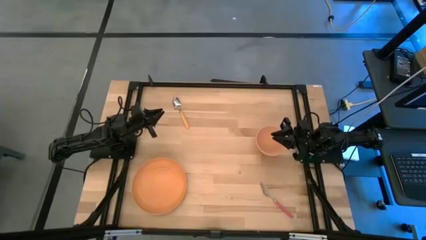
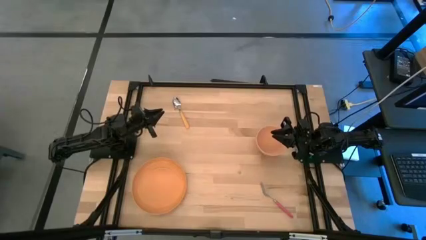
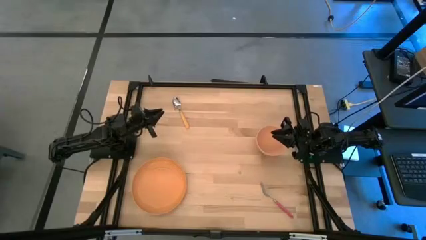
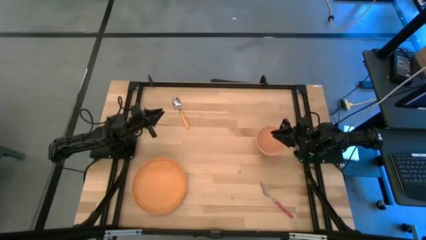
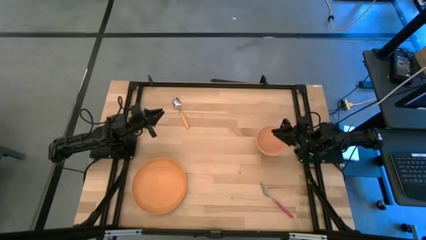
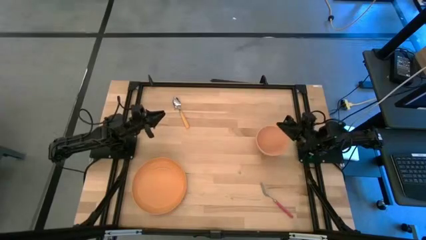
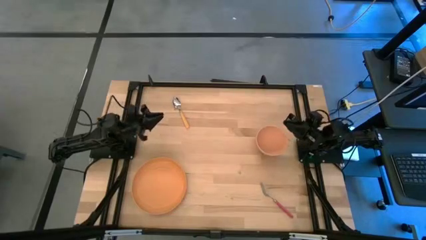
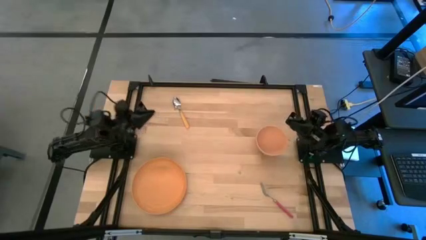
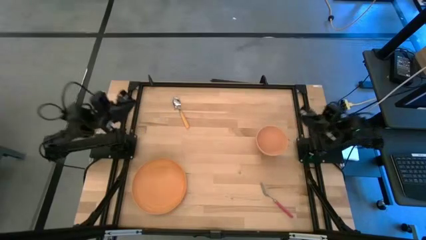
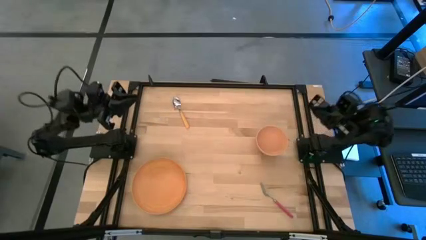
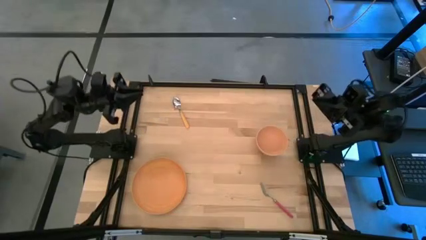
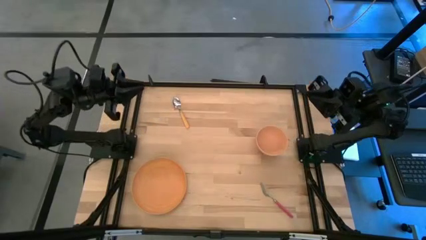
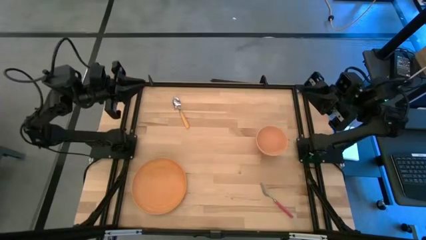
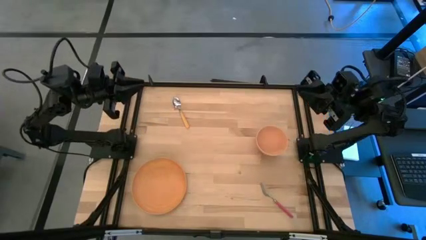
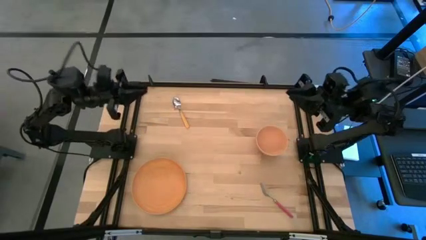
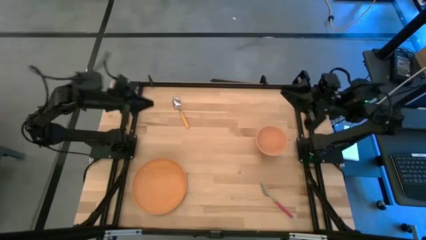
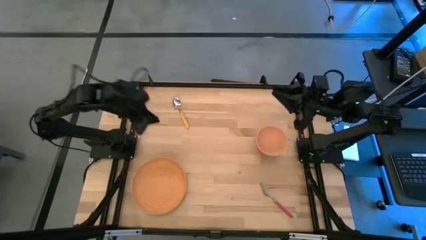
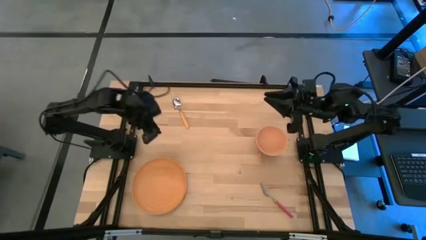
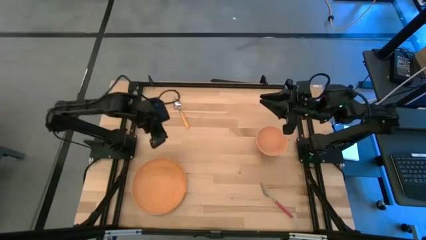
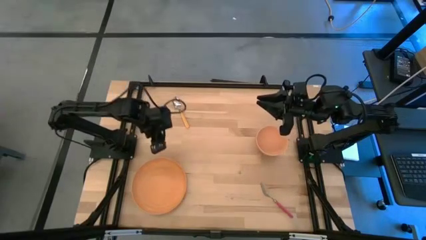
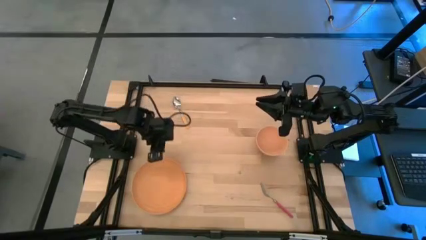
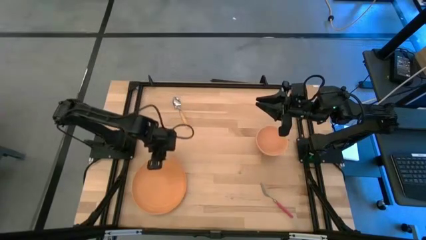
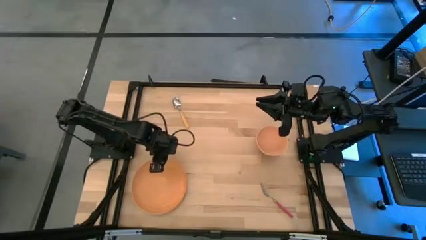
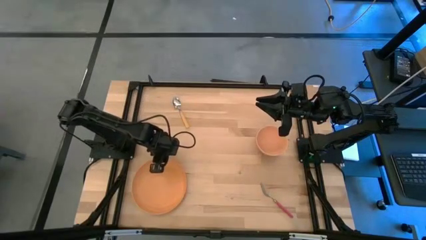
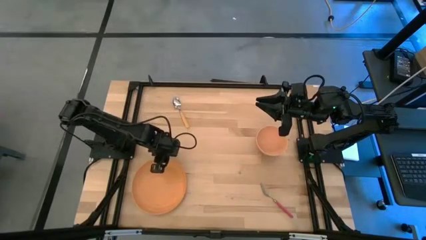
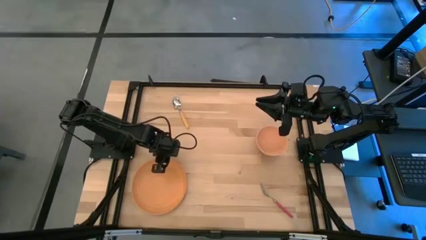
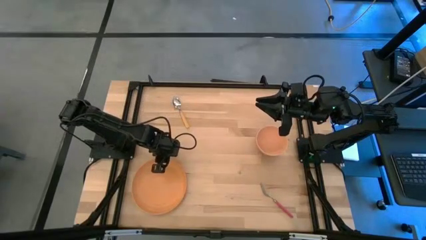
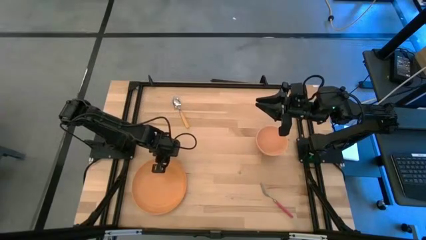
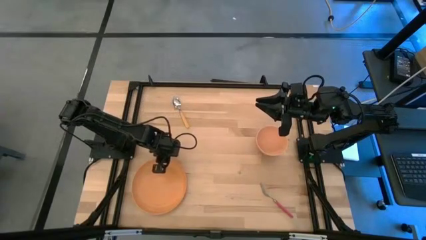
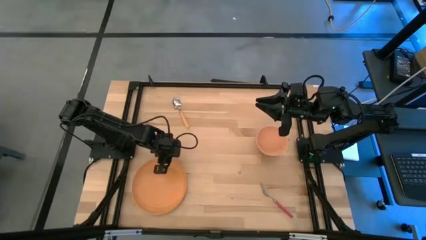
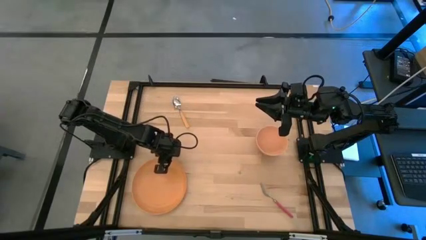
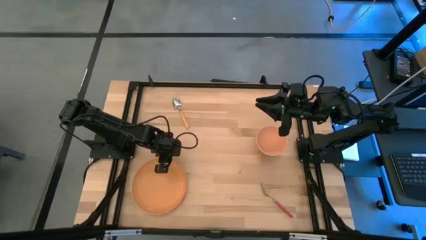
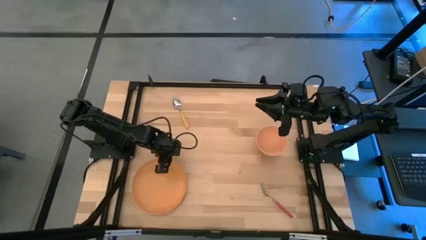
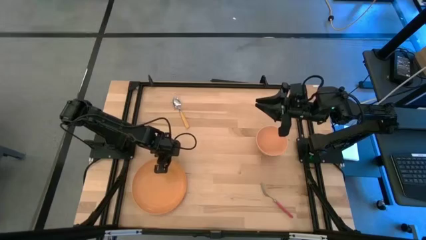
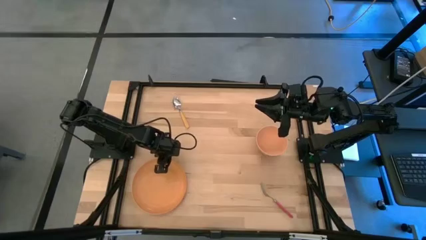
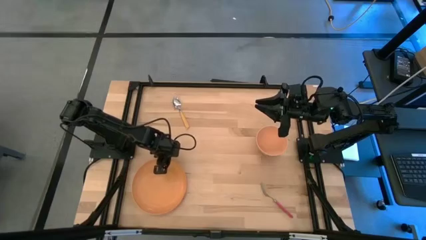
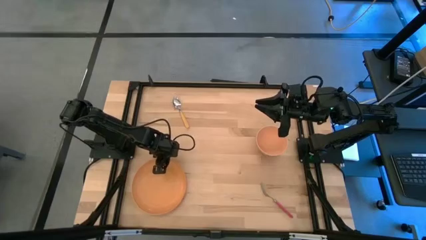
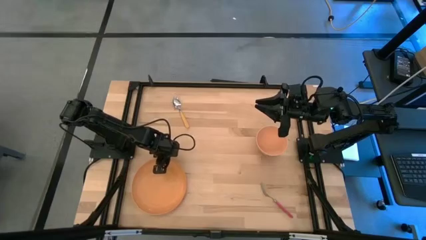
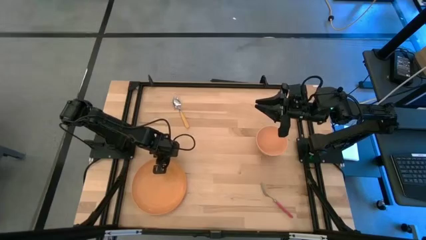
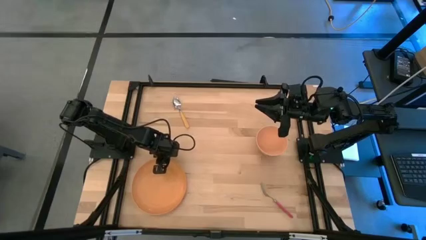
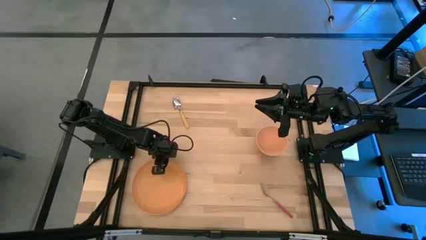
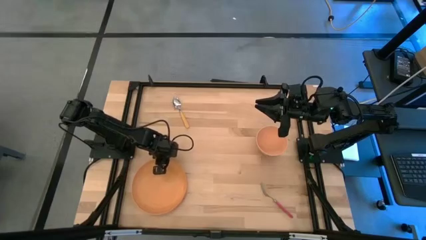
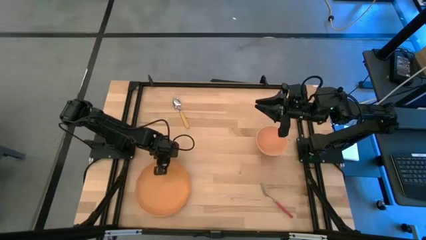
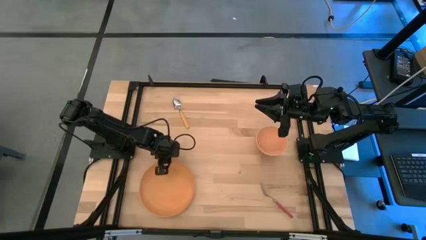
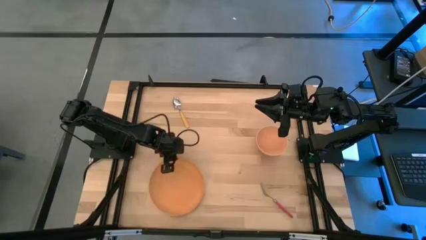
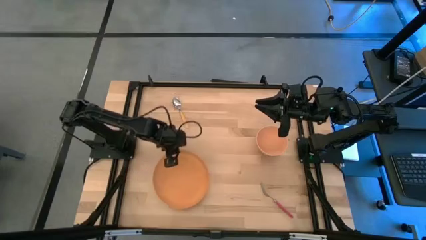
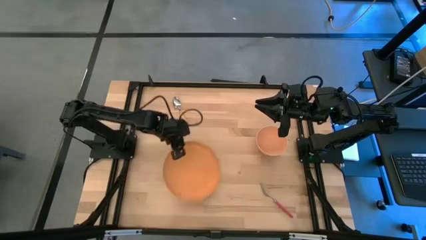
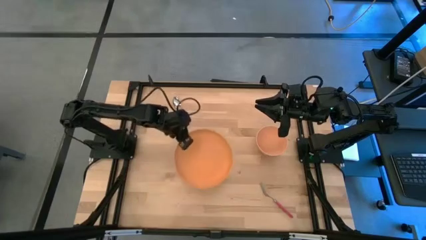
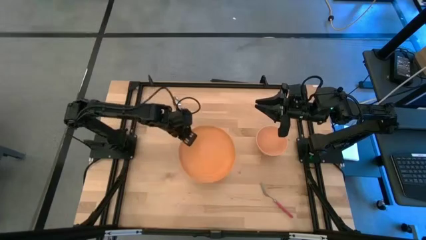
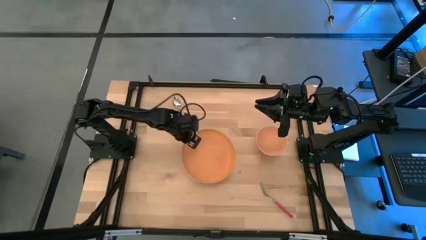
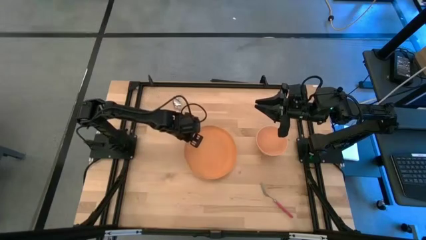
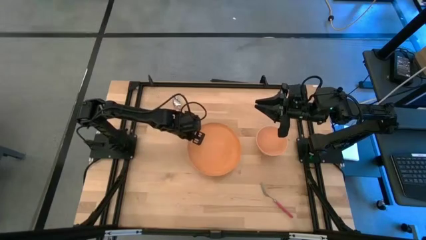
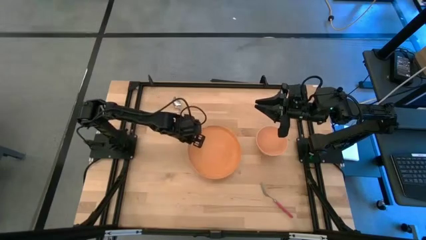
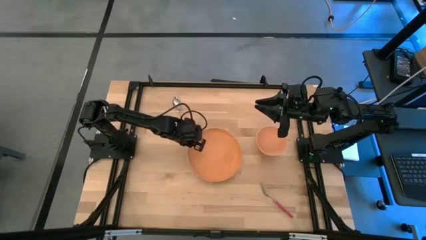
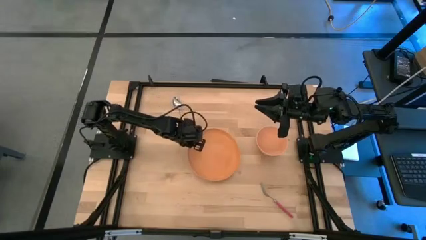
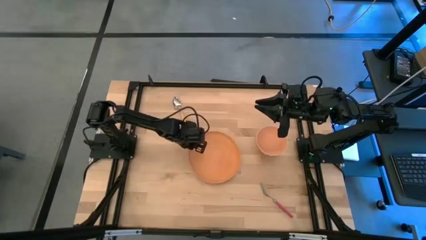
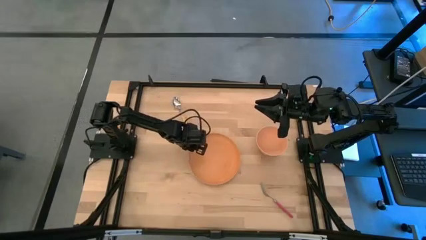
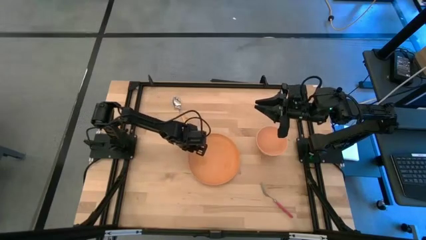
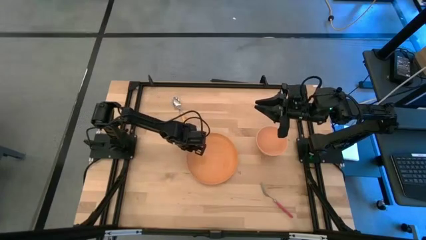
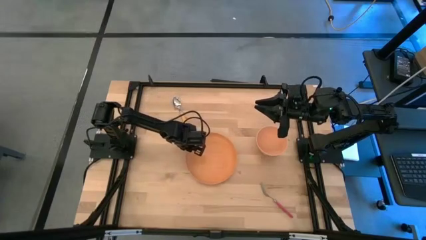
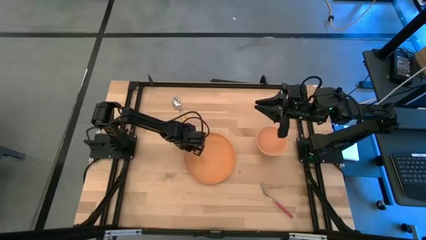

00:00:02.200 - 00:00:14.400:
Task: Set table place
Move the orange plate to the center of the table

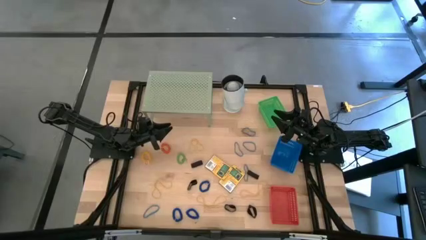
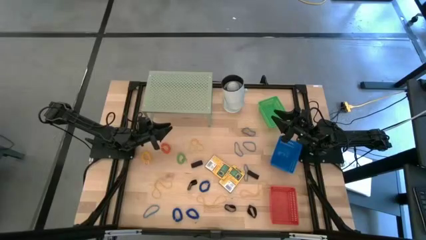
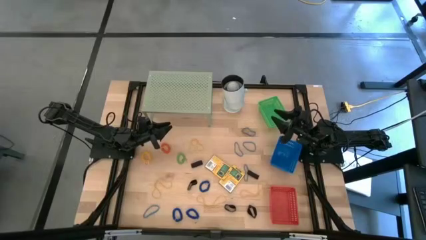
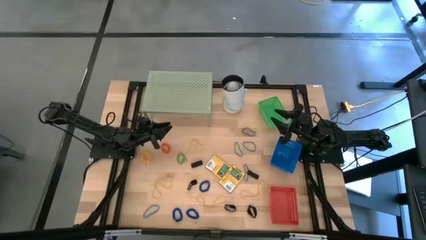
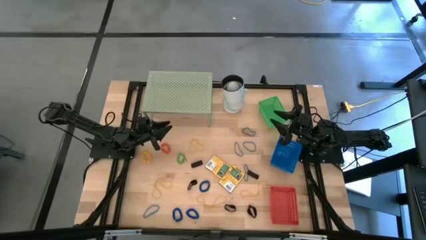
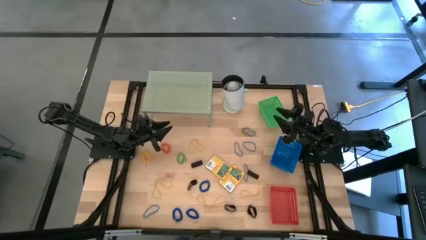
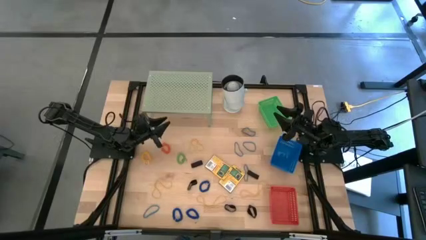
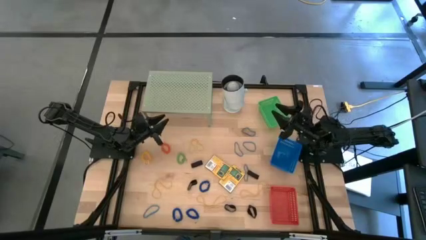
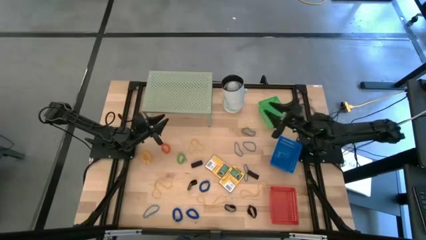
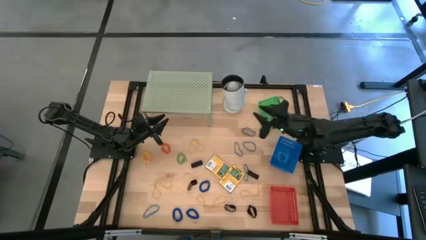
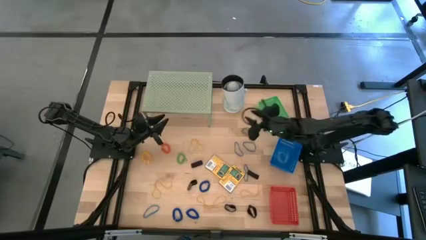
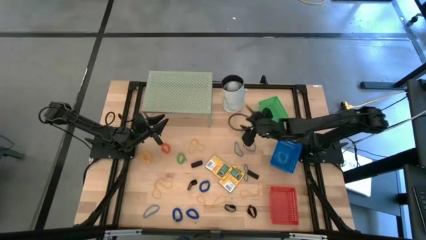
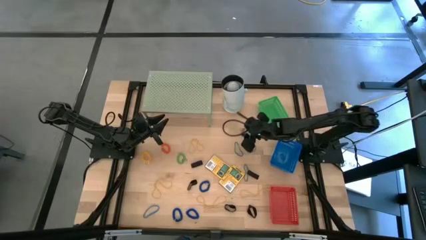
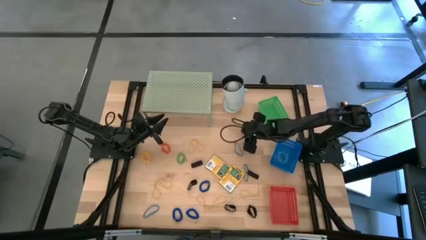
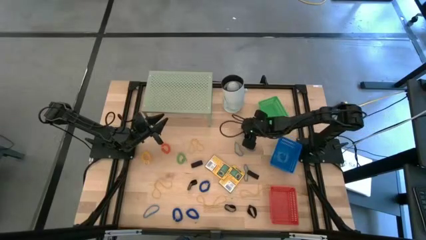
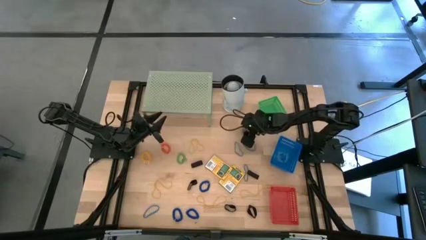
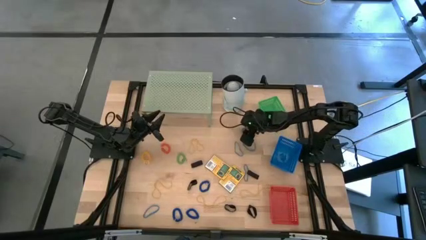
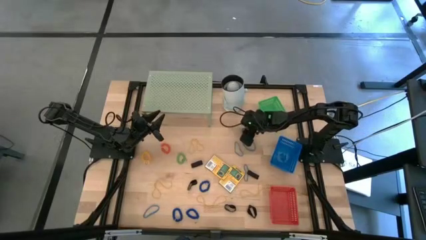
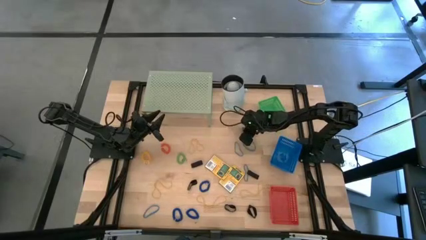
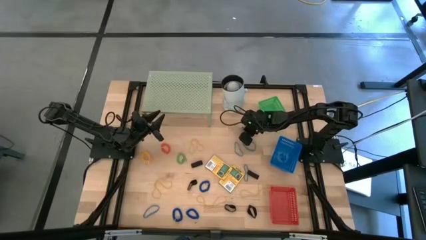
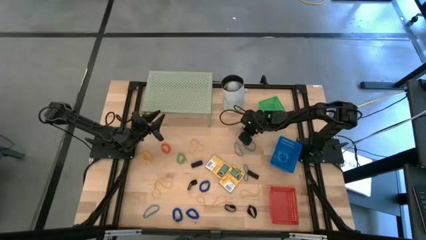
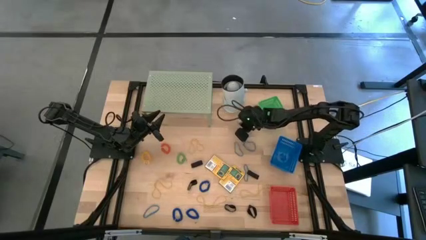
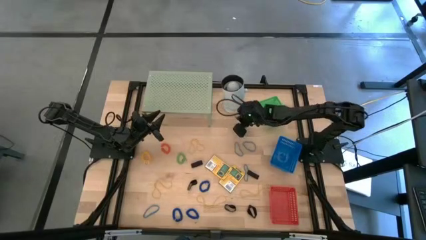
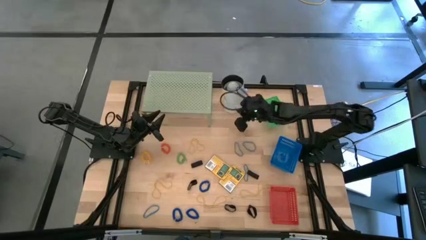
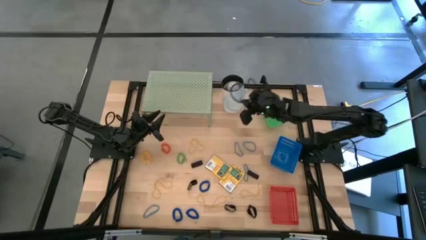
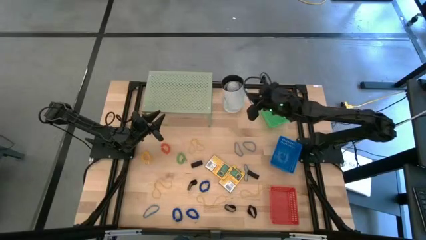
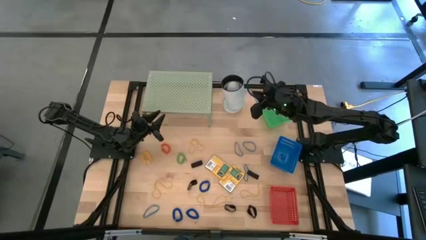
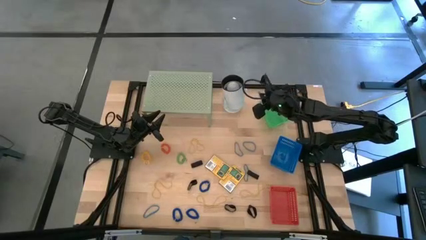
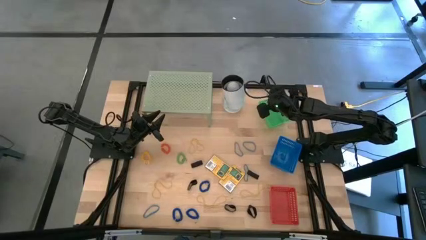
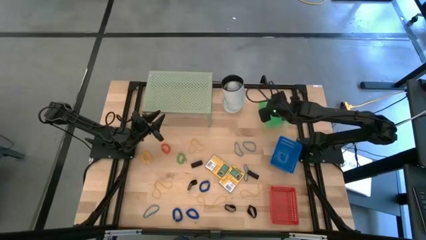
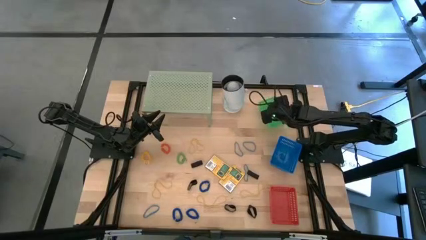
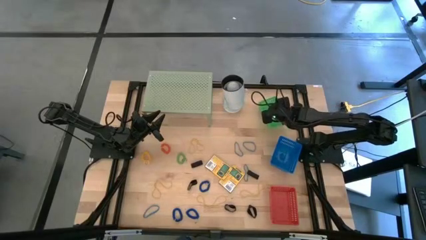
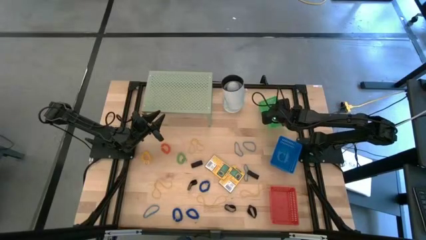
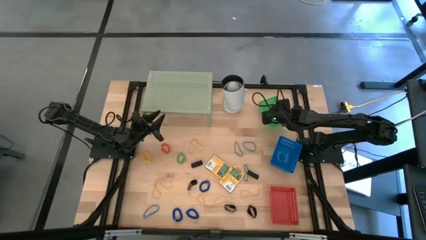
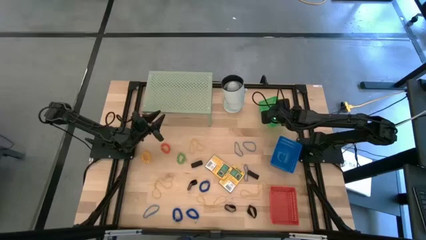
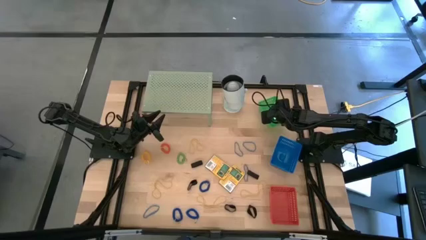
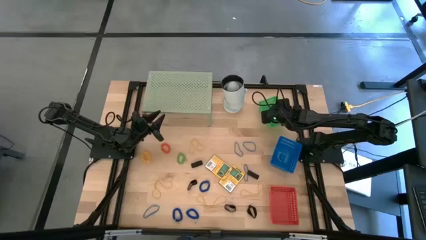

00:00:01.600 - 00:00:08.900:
Task: Pick & Place Office Desk Supplies
Put the blue rubber band into the green bin
